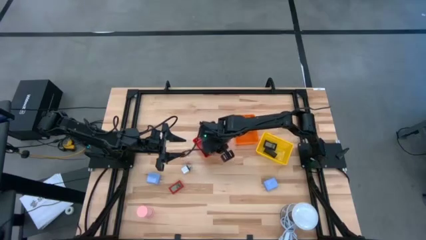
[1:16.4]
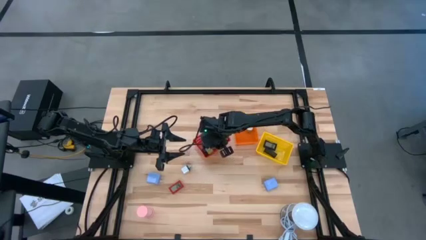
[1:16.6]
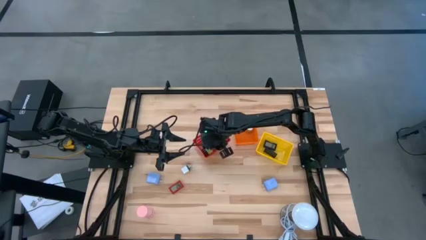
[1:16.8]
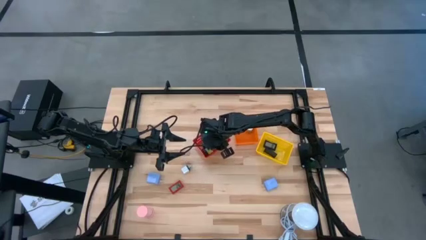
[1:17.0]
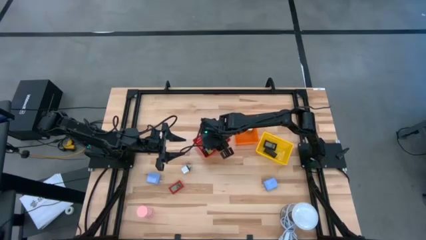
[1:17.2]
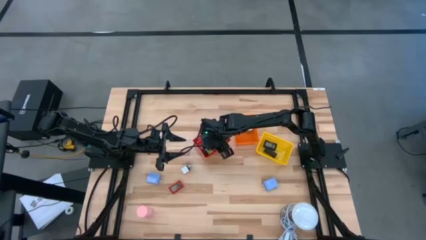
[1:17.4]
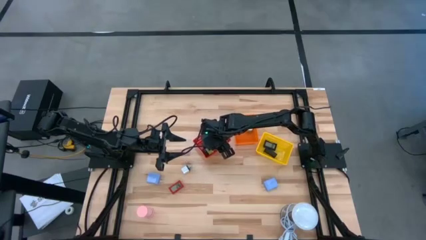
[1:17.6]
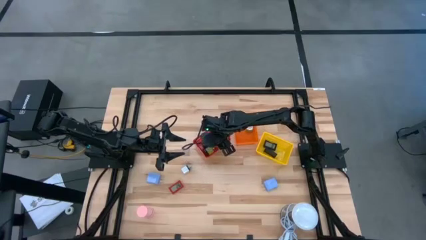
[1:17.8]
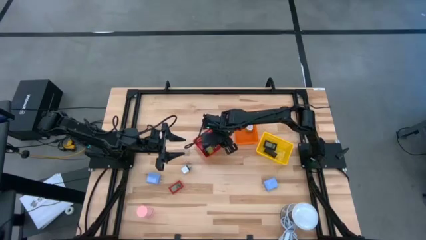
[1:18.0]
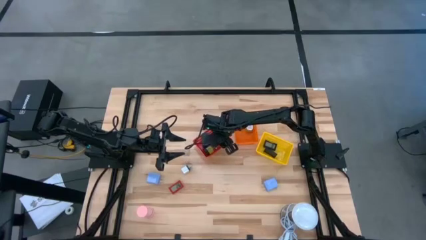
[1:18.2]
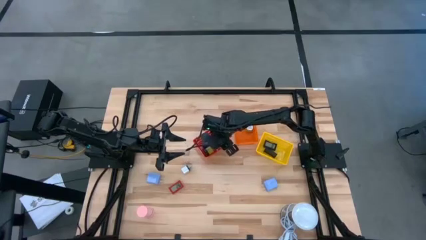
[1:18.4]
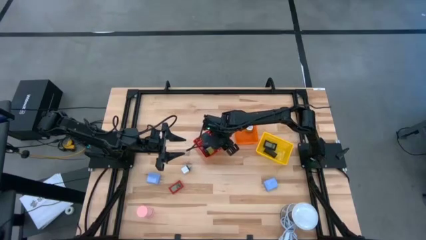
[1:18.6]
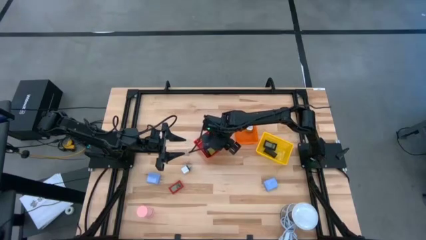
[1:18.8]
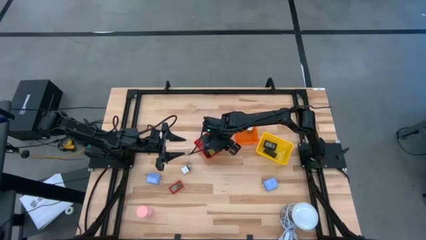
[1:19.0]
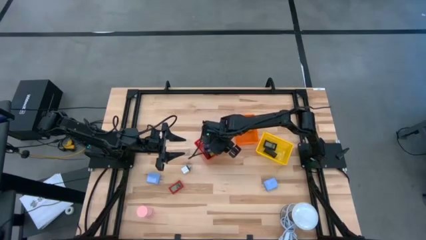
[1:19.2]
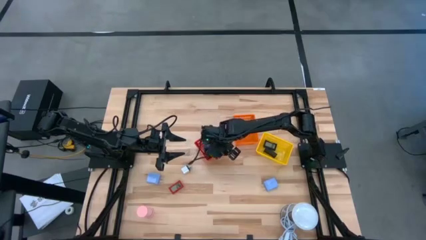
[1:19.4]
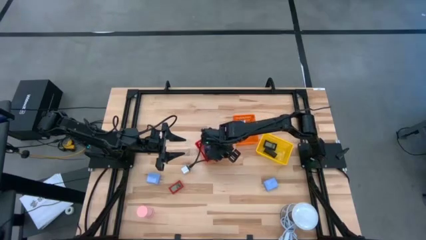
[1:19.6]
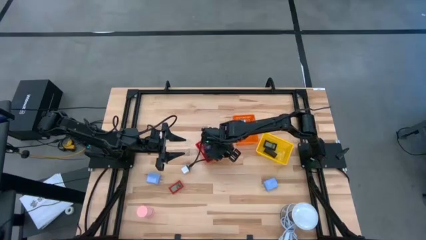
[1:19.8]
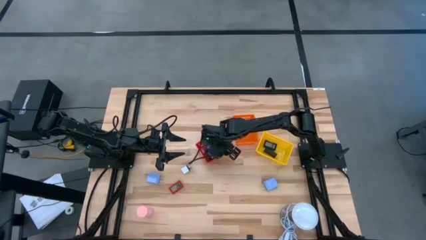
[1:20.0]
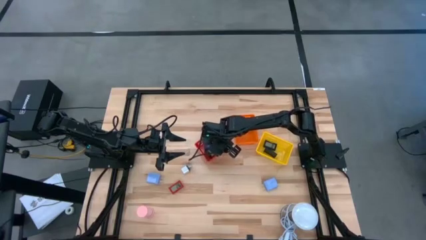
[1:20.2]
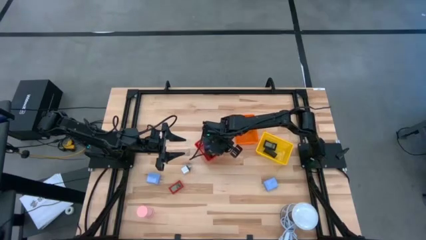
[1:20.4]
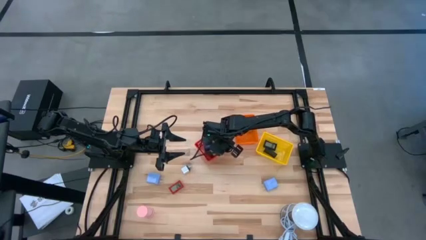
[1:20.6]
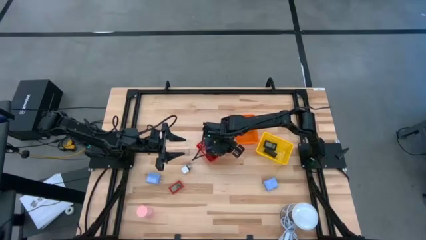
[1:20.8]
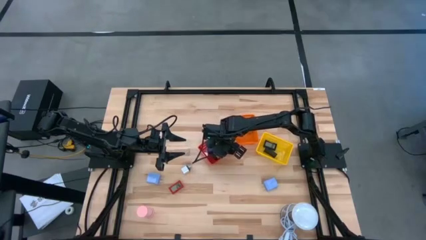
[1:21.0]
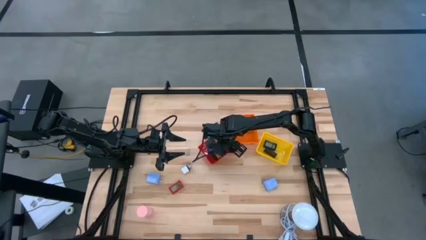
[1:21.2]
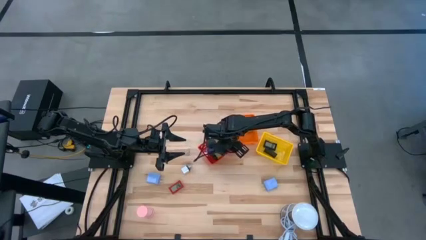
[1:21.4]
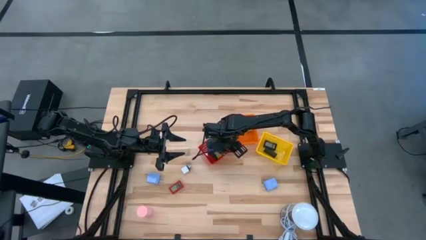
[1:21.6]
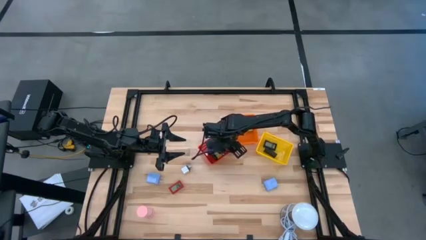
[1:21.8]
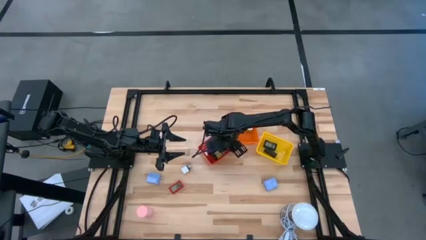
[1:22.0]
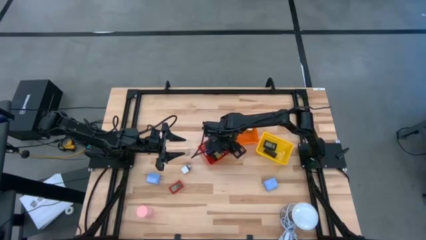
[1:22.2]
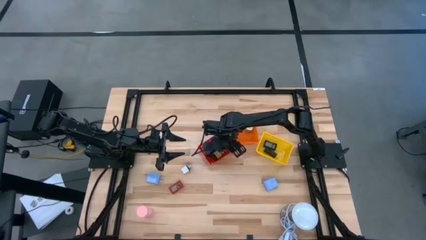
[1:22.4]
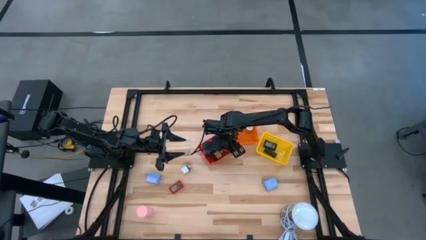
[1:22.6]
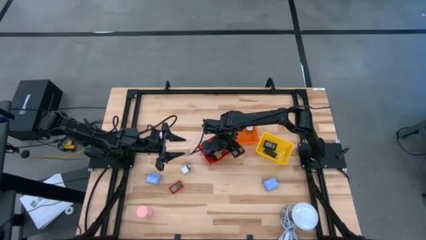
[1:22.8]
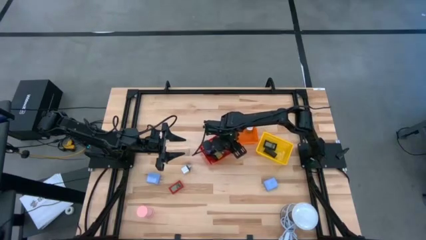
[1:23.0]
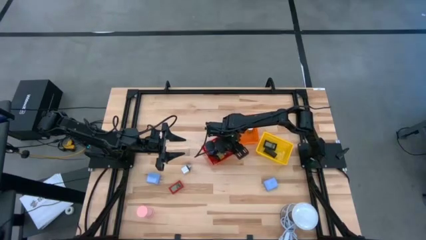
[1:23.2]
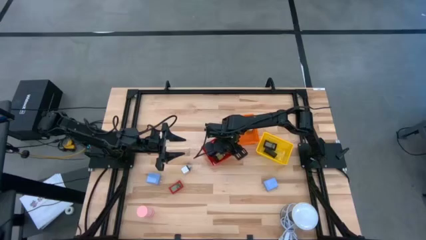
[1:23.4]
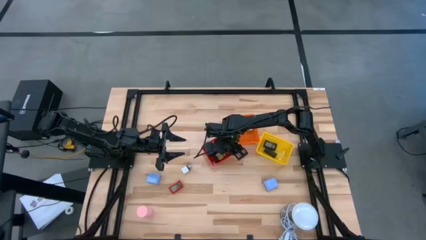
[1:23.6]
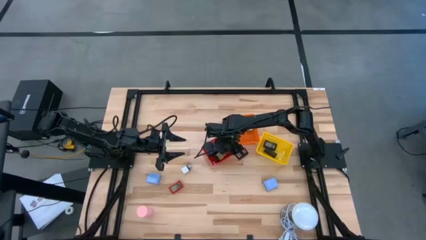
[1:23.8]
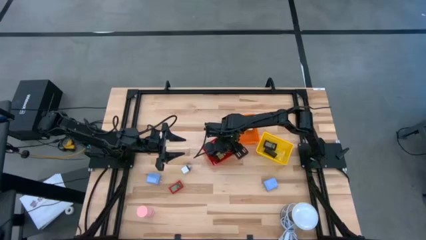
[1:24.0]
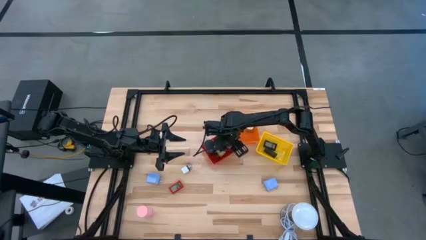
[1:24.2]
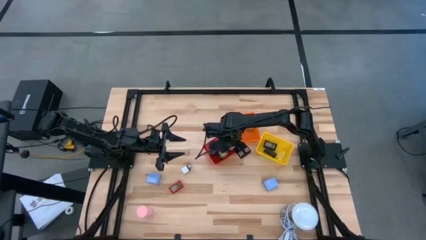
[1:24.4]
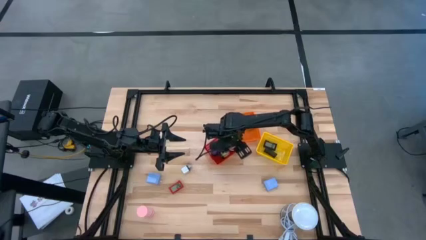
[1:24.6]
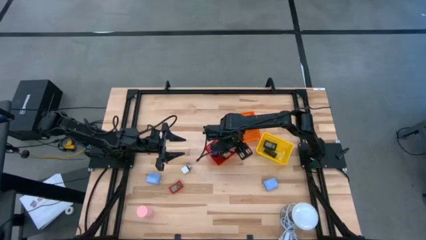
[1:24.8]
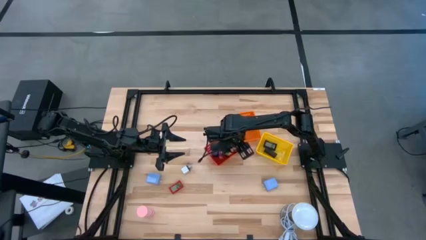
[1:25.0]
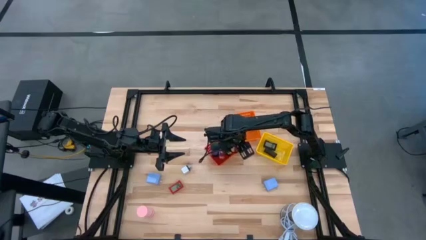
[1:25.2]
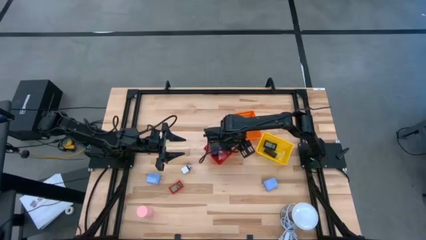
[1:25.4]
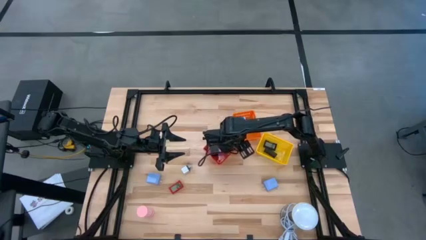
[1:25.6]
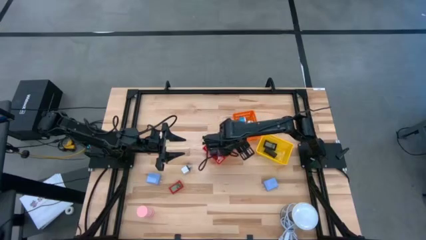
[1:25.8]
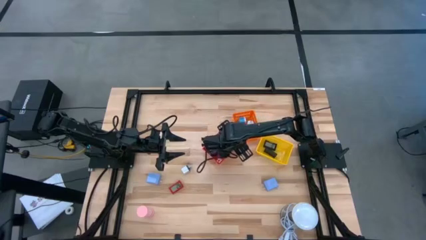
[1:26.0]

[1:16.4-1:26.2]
Task: Pick & Place Office items
Adjust the green hourglass inside the red bin

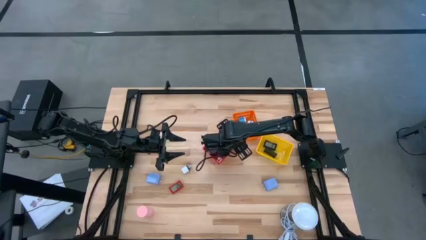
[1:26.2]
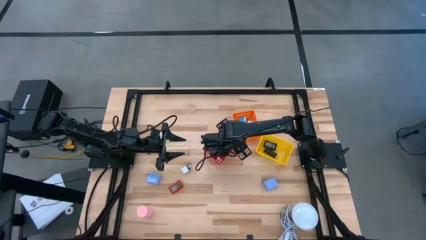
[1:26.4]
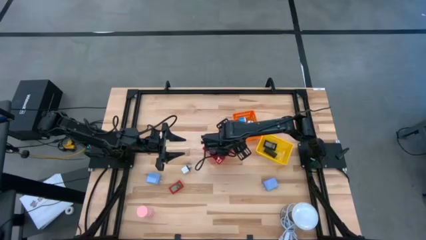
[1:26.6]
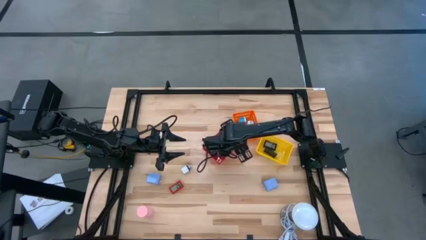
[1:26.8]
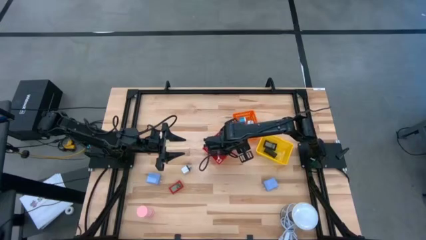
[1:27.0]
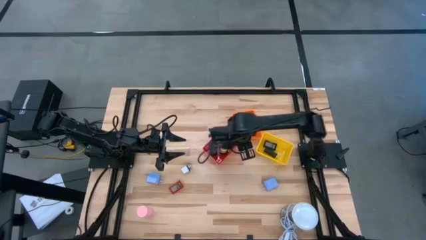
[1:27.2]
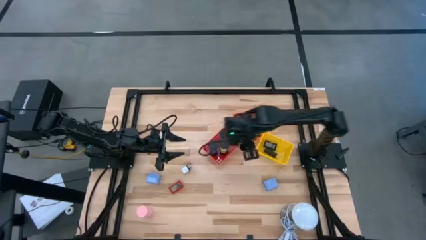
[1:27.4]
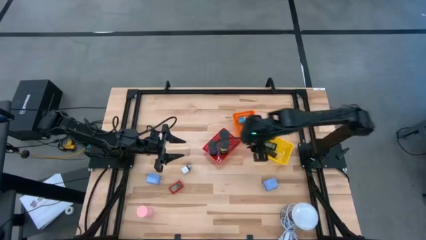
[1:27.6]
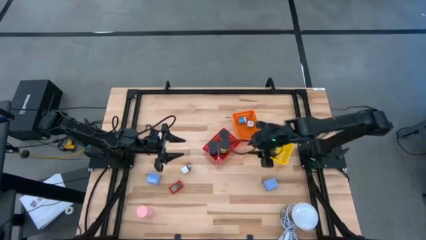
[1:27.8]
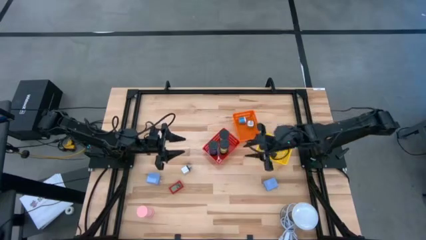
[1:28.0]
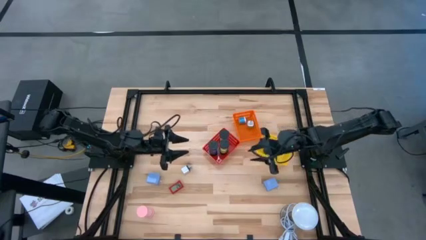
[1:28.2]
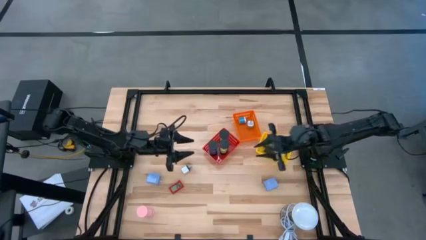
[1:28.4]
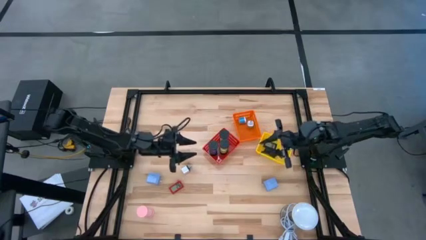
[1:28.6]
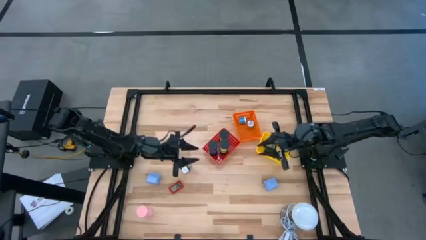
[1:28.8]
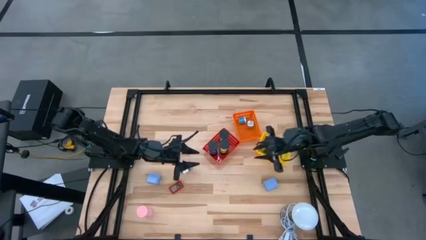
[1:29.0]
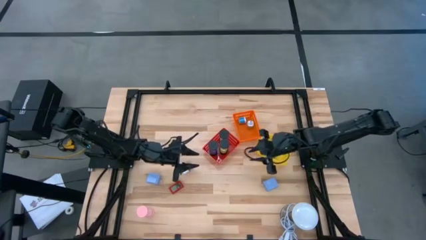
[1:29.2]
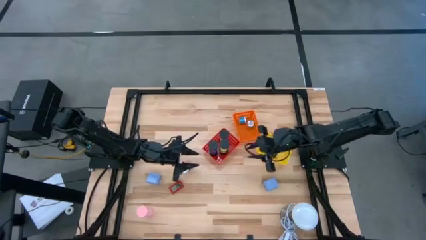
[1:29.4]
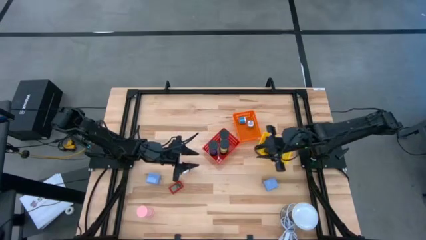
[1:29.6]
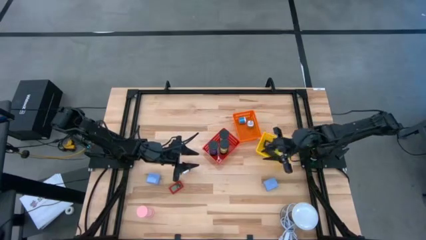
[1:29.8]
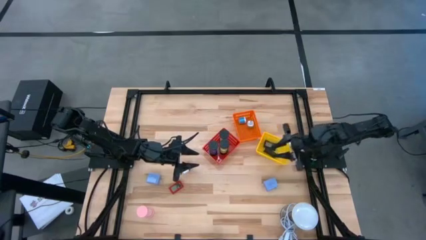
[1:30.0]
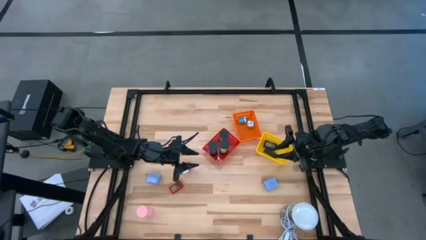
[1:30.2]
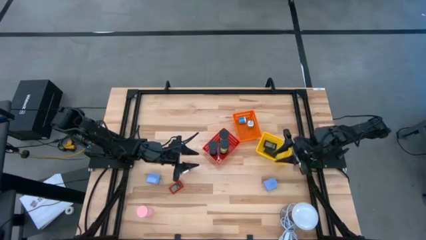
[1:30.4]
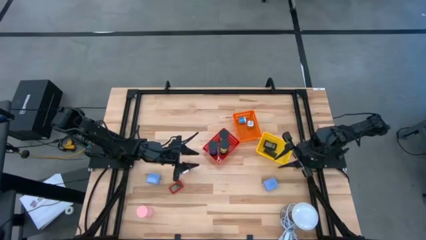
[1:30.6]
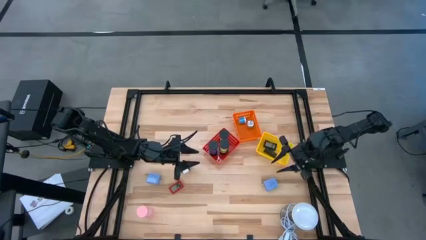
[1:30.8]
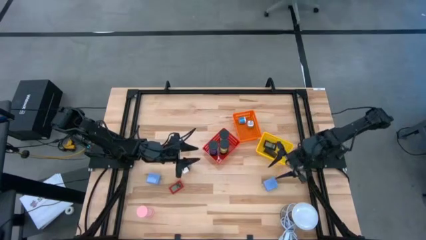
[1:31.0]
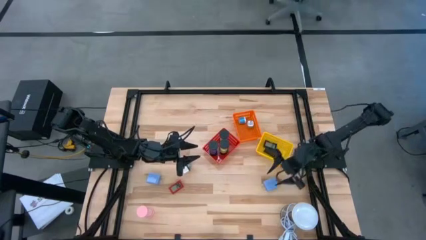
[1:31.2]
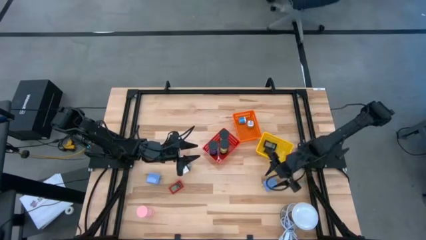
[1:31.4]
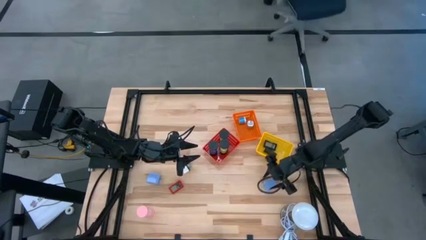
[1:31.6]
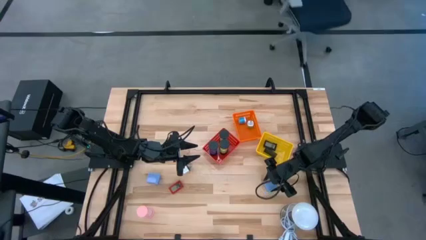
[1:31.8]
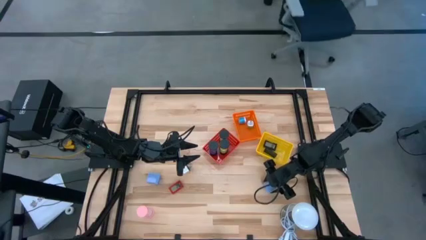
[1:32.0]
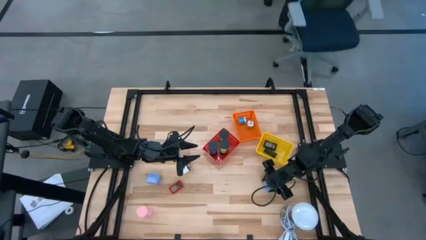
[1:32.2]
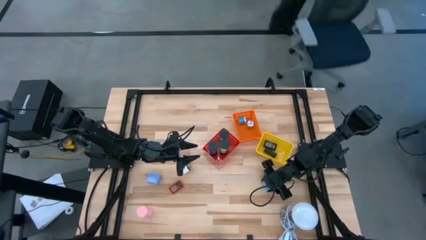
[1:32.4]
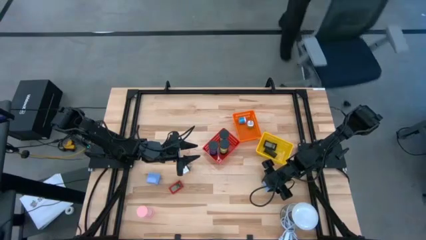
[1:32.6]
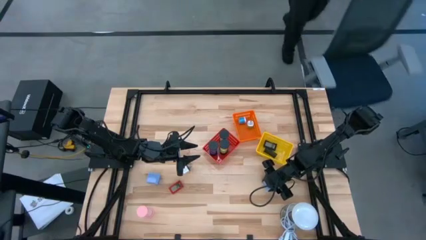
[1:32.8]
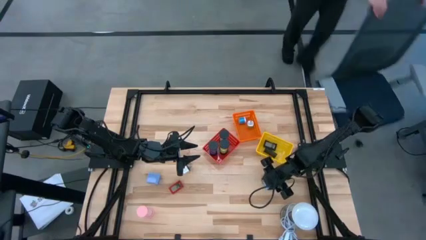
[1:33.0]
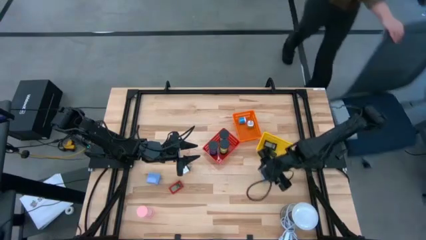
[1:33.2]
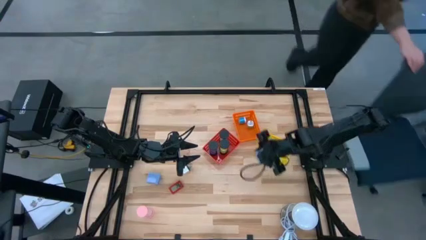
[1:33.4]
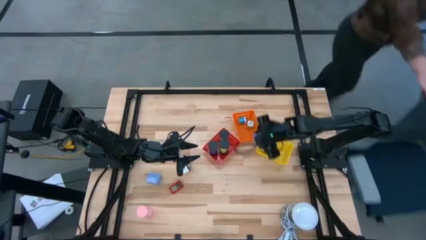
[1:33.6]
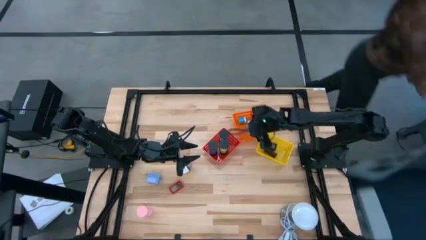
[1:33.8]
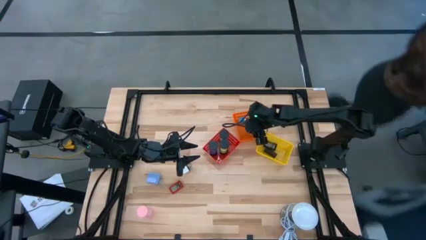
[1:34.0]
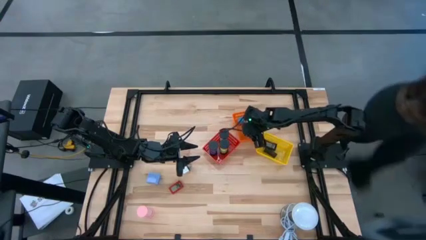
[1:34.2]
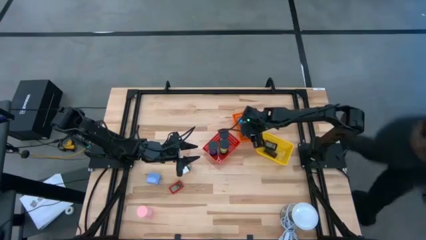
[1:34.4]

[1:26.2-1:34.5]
Put the right blue charger adapter into the orange bin
